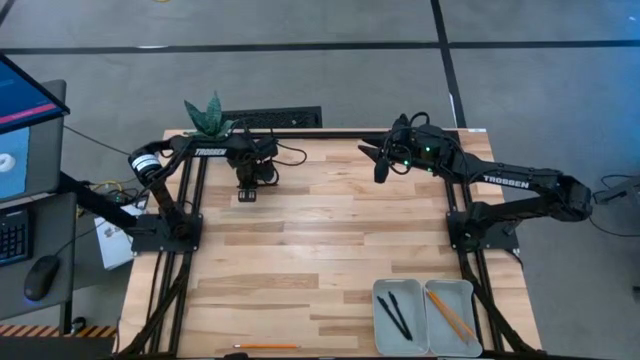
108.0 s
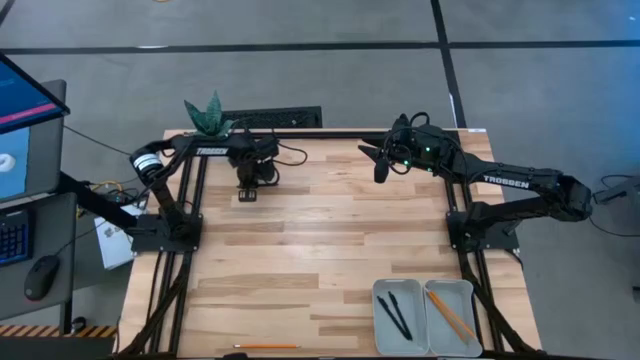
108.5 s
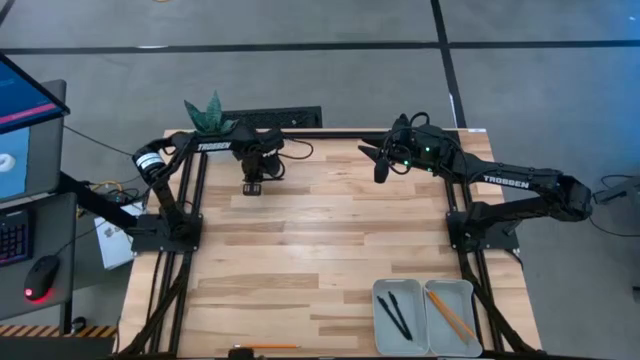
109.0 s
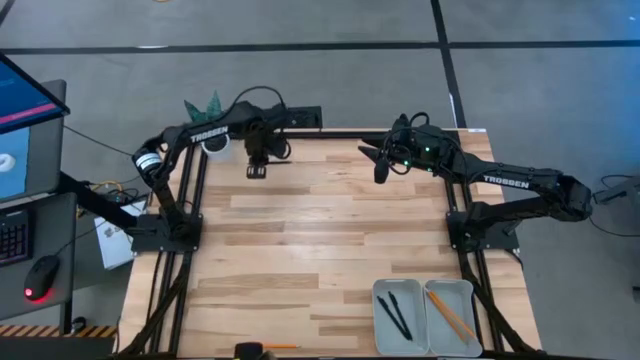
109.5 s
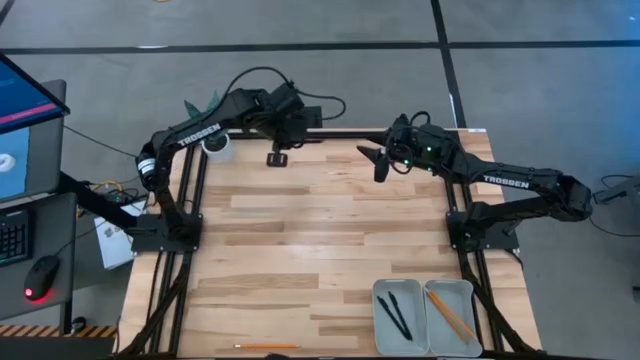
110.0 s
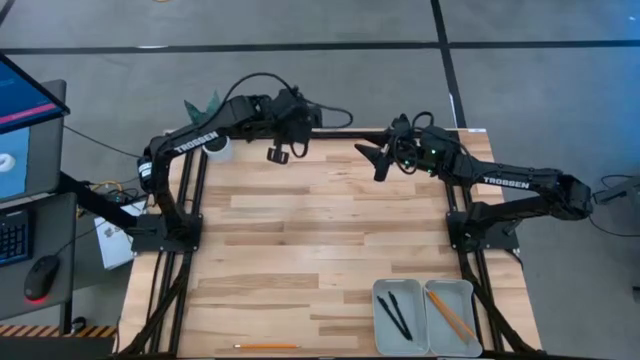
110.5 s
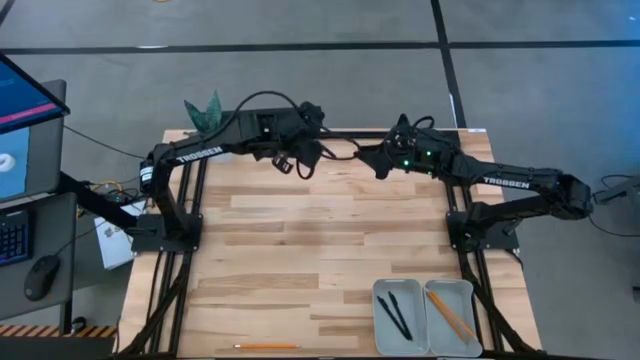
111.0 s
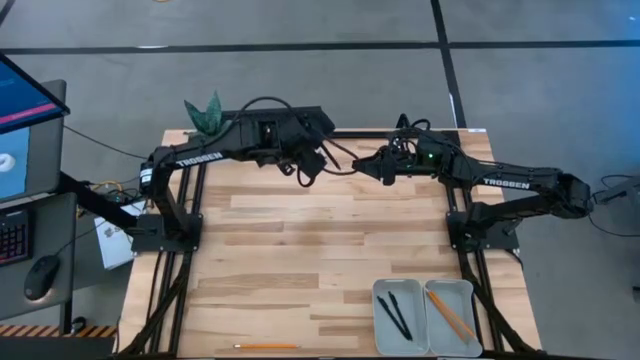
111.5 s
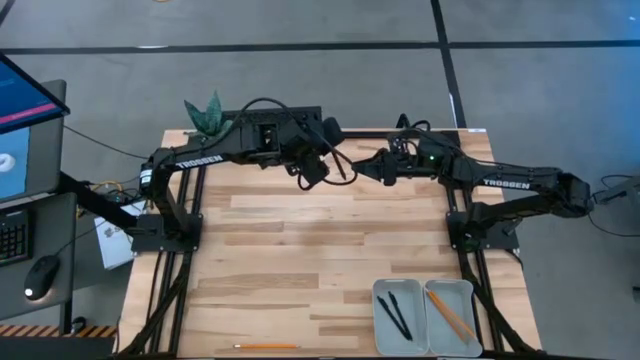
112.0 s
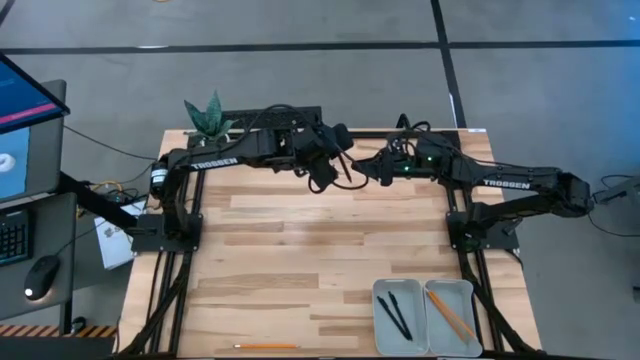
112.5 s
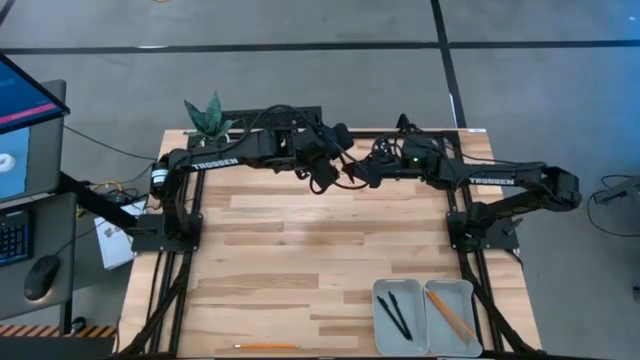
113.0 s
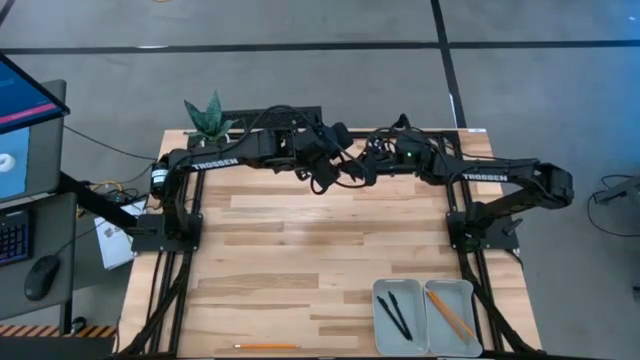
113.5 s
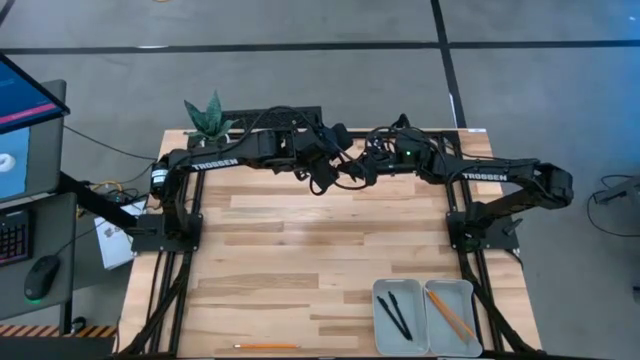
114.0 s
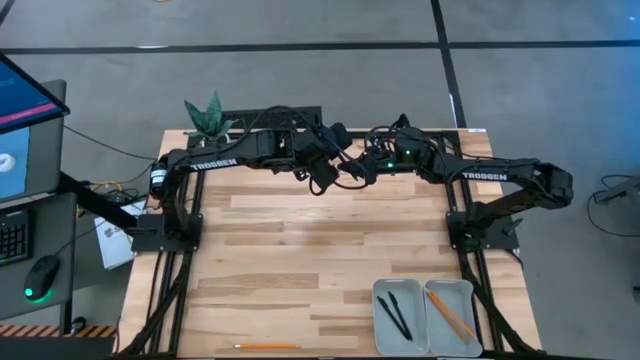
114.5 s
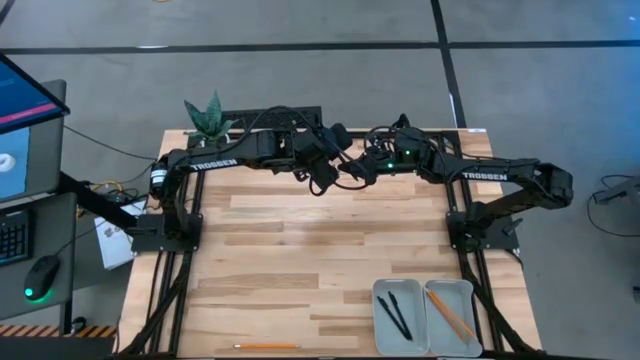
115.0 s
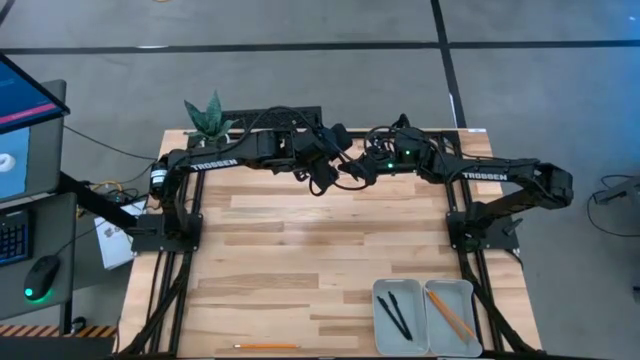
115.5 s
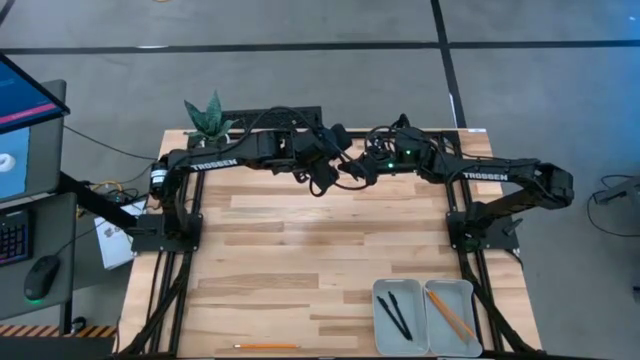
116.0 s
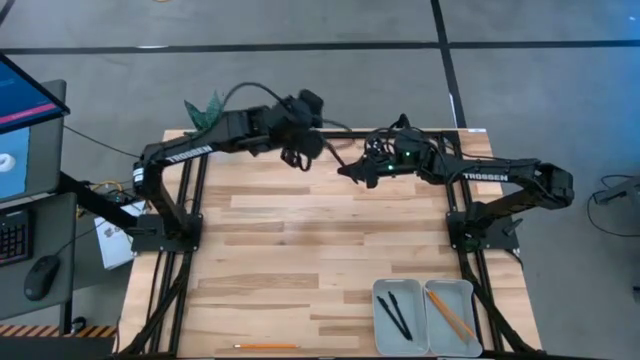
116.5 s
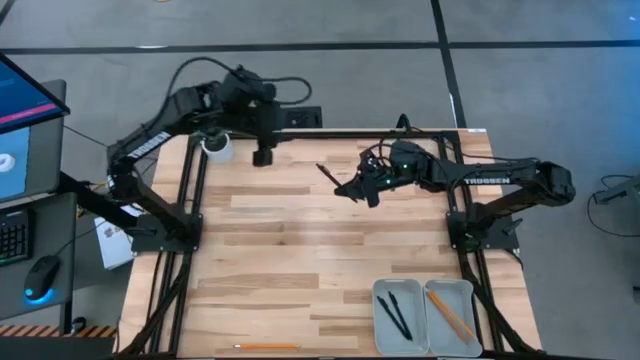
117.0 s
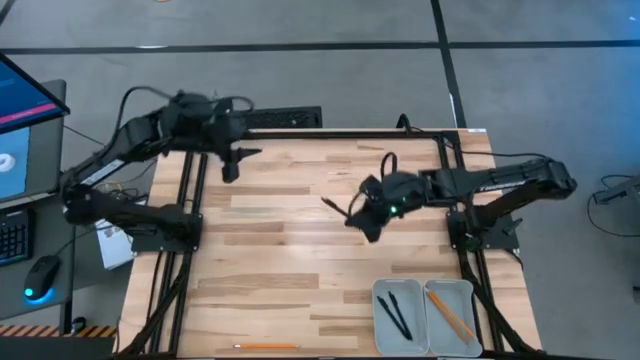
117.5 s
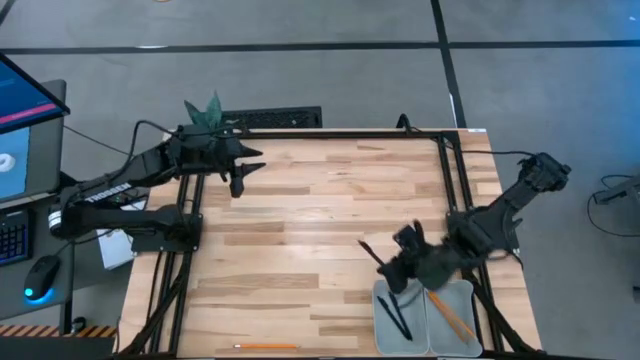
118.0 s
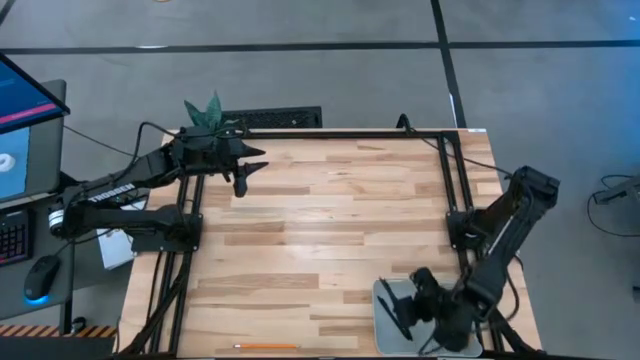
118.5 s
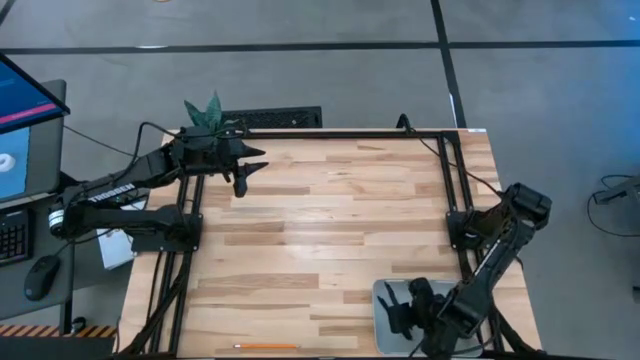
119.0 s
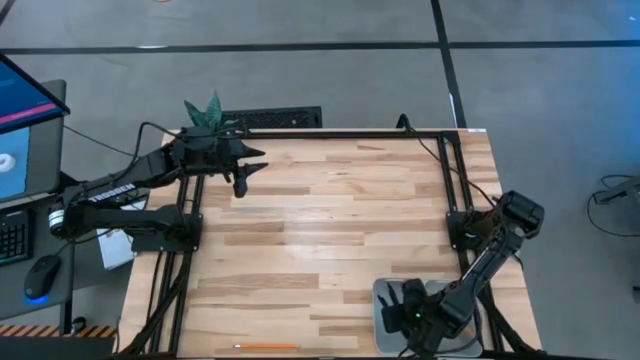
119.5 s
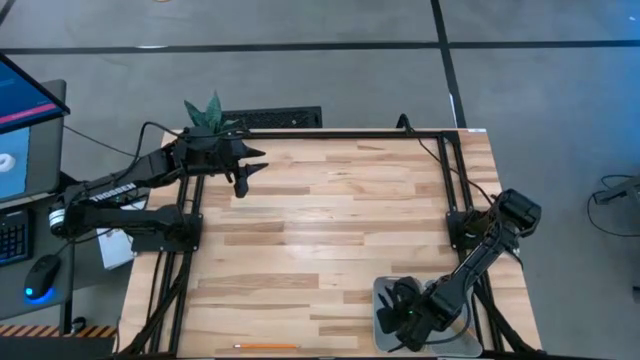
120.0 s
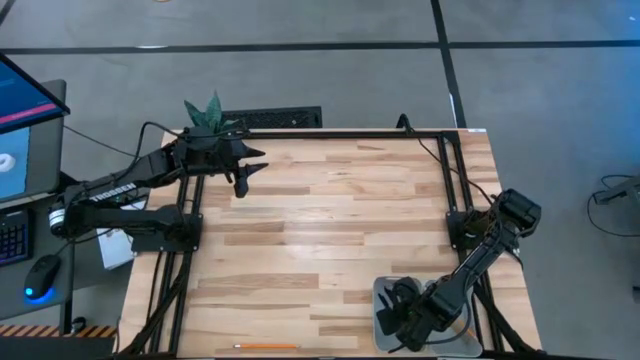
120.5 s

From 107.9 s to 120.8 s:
Task: Sort pens & pencils
Put the black pen into the bottom left gray bin

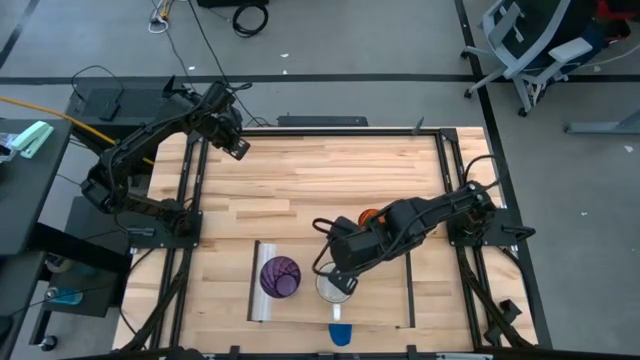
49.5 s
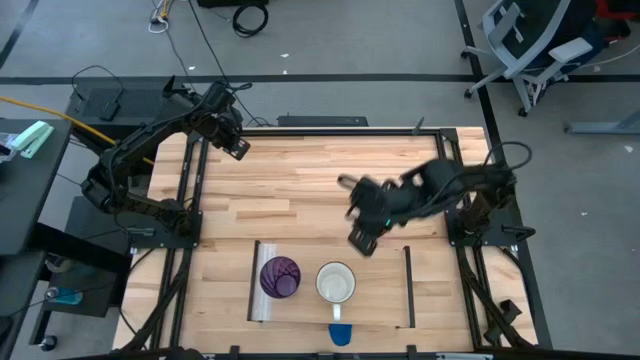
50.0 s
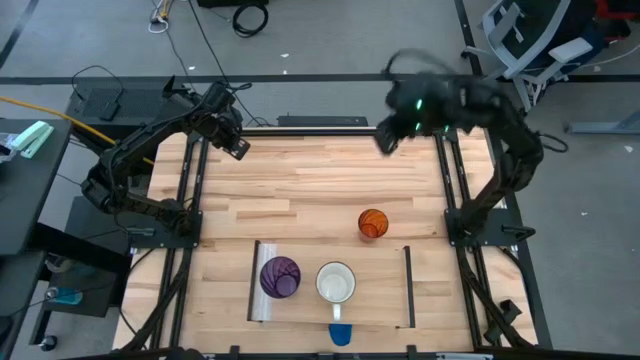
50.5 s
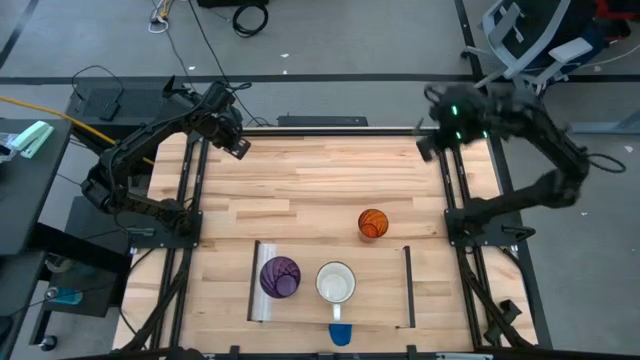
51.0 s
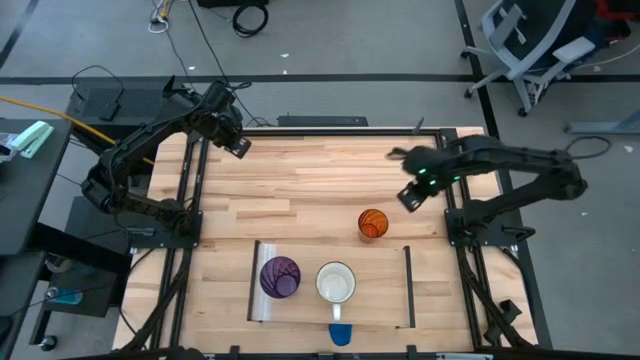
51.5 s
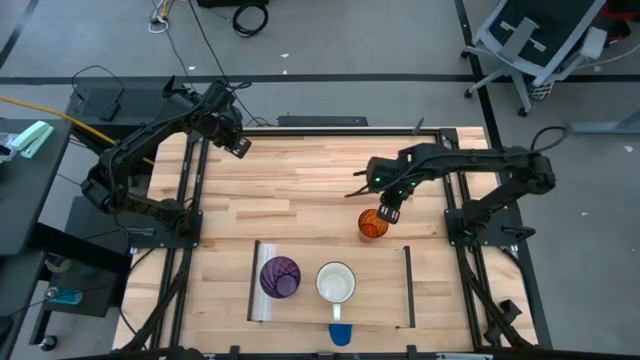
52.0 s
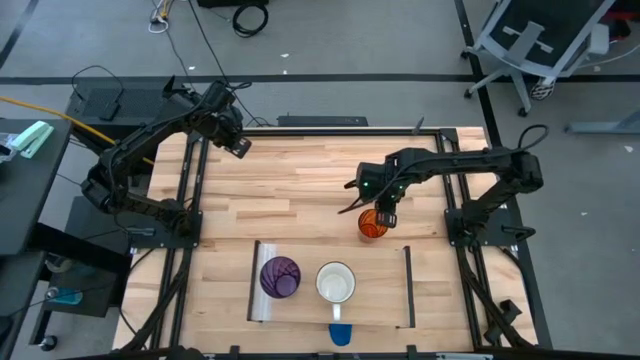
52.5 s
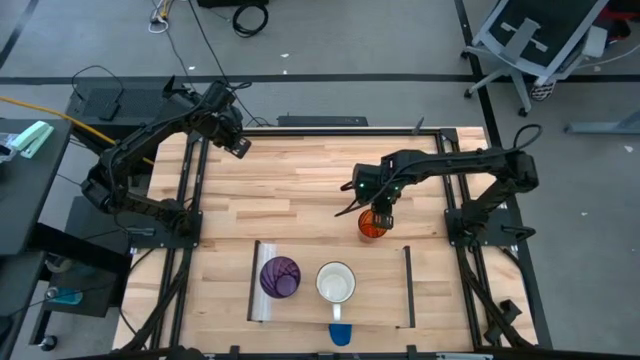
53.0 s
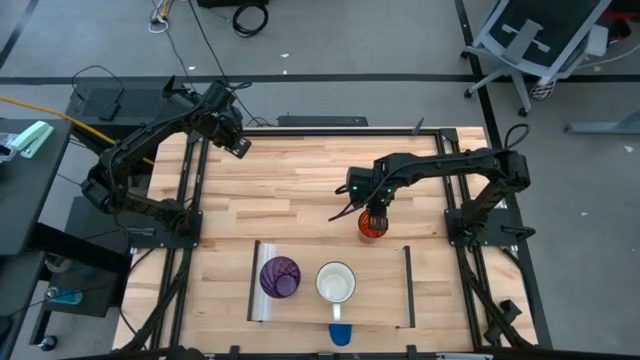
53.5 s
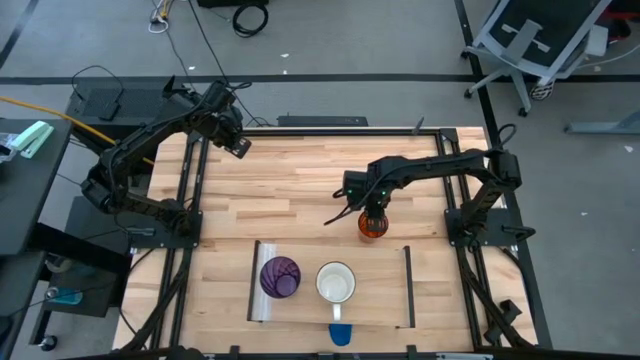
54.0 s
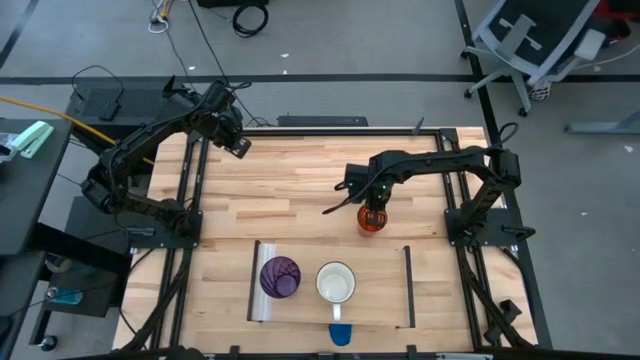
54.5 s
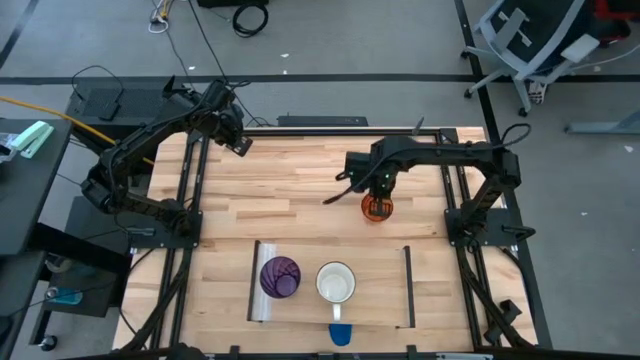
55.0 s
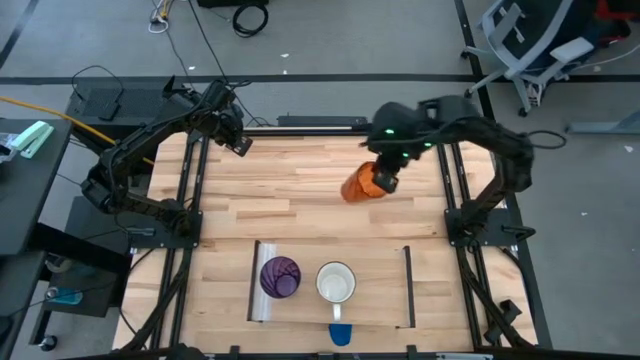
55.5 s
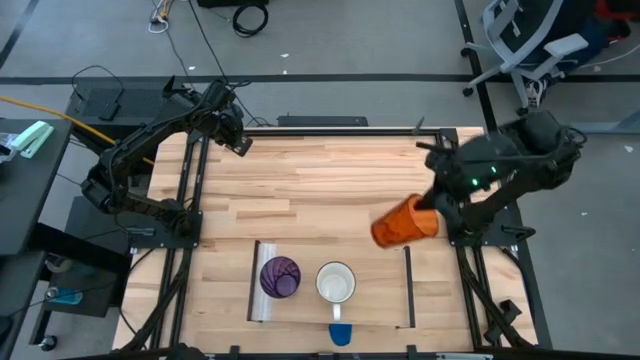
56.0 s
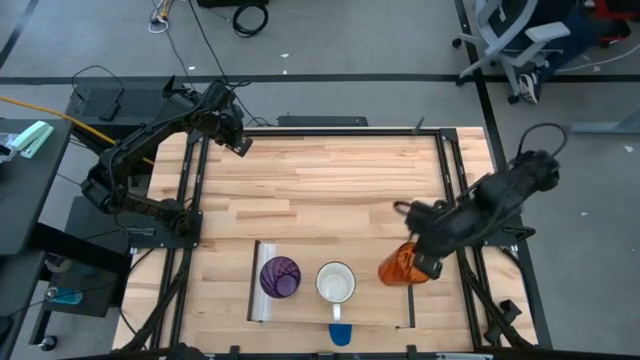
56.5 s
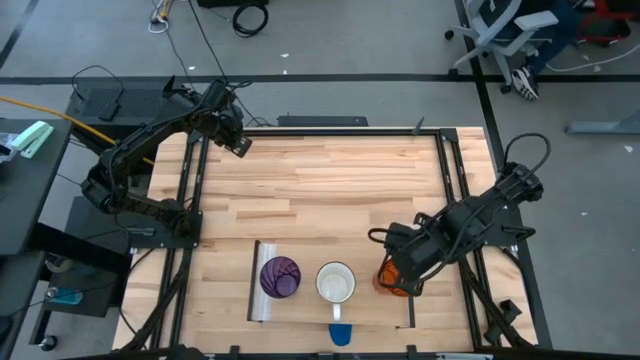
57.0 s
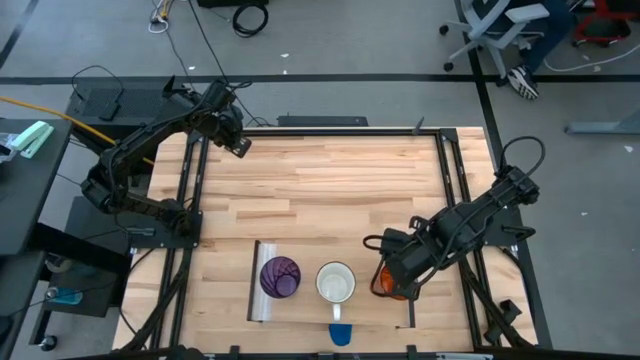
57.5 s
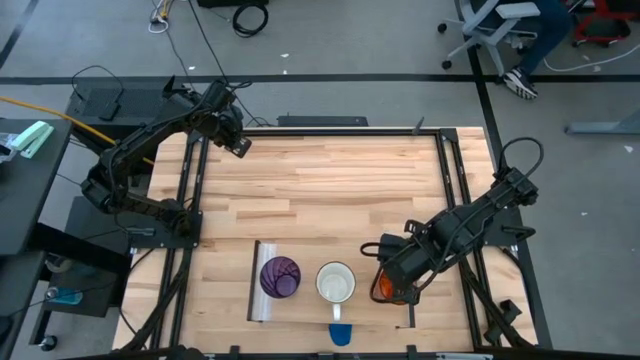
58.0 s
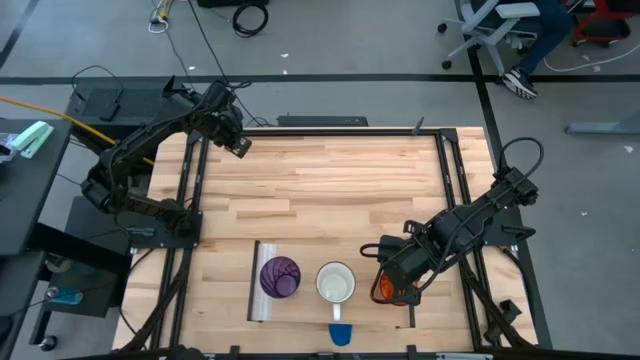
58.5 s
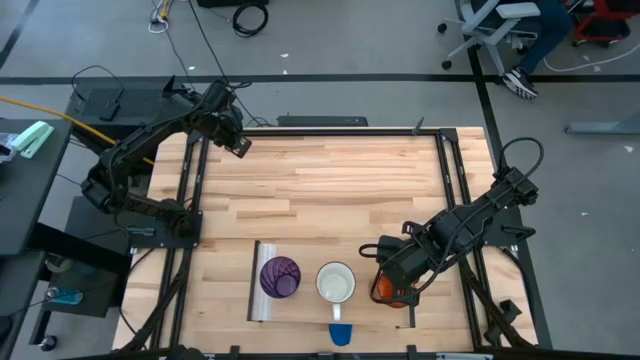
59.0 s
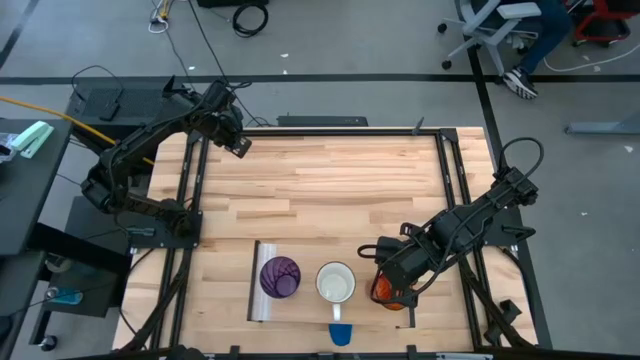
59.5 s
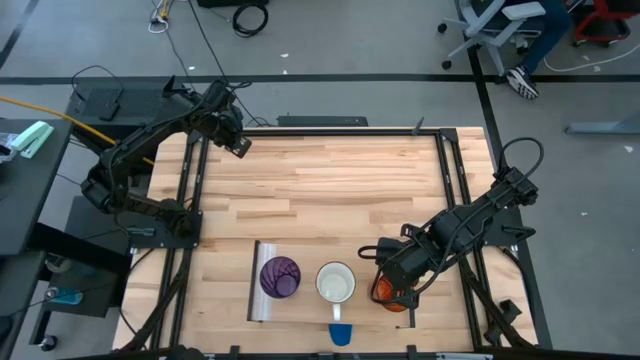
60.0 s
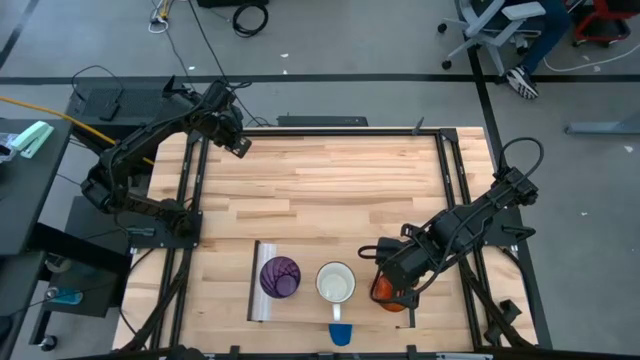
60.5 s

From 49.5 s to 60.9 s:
Task: Stack small to large cups/mugs on shelf
Put the orange cup on the shelf
